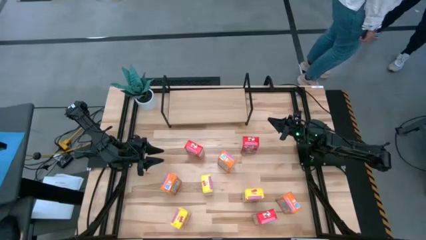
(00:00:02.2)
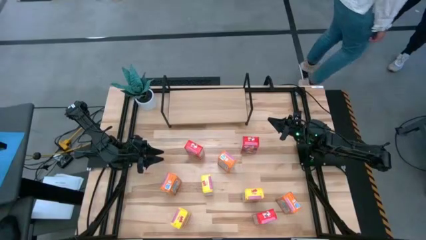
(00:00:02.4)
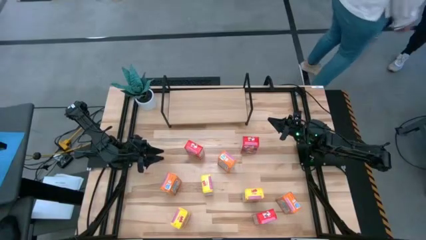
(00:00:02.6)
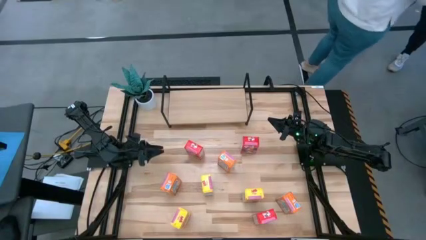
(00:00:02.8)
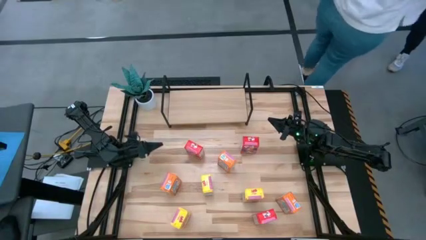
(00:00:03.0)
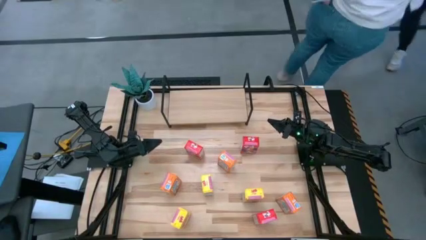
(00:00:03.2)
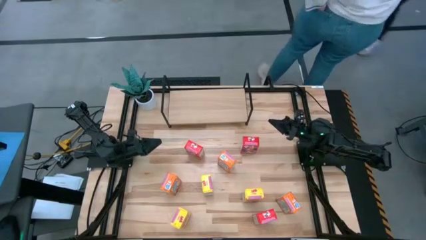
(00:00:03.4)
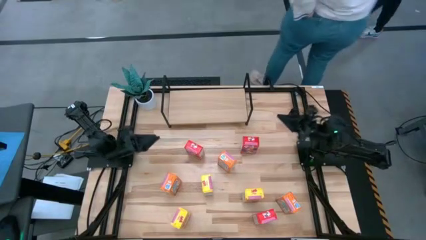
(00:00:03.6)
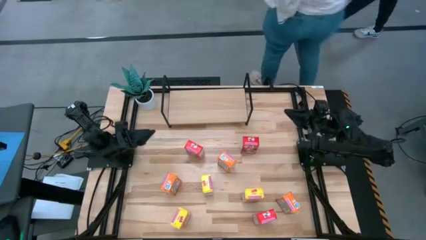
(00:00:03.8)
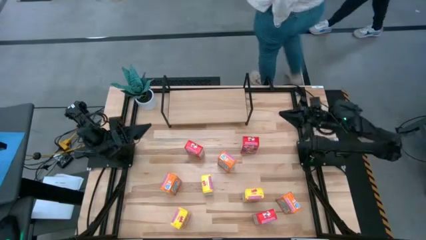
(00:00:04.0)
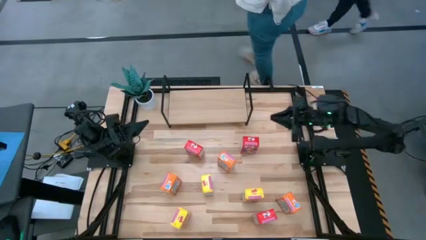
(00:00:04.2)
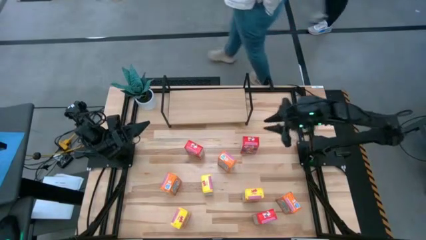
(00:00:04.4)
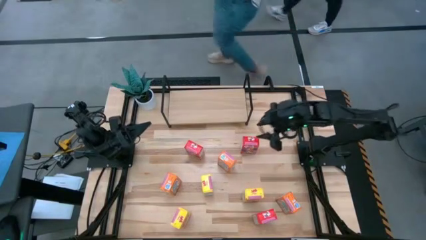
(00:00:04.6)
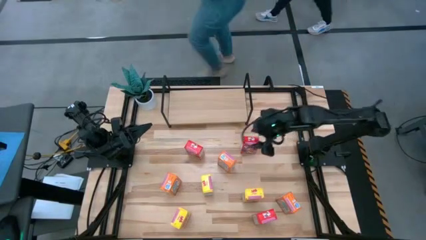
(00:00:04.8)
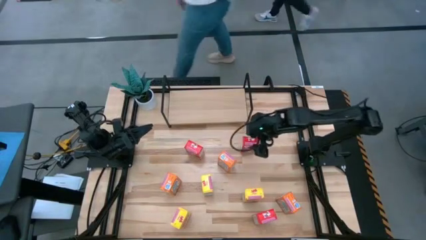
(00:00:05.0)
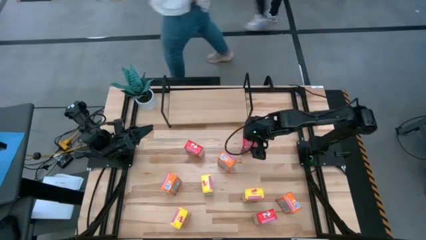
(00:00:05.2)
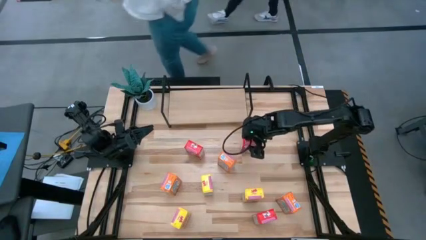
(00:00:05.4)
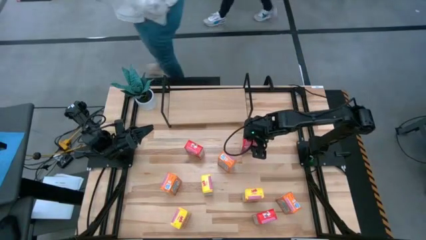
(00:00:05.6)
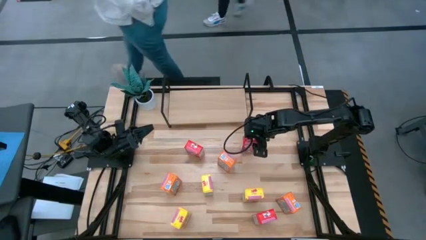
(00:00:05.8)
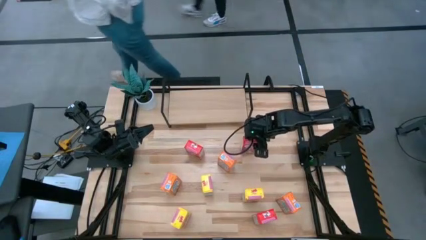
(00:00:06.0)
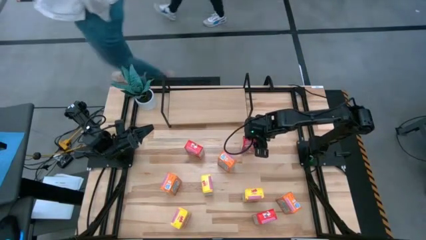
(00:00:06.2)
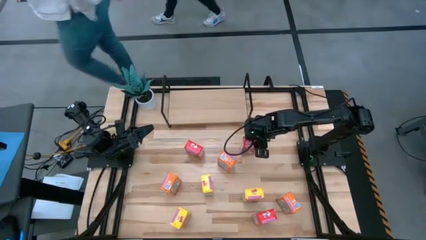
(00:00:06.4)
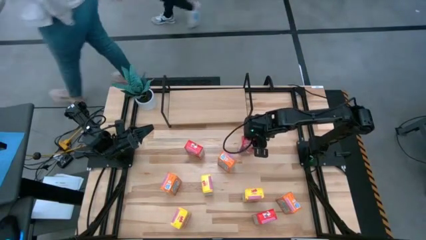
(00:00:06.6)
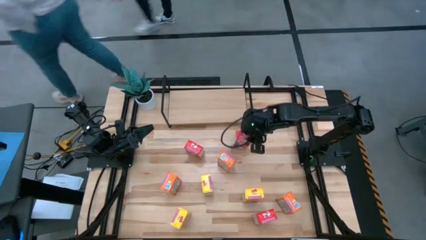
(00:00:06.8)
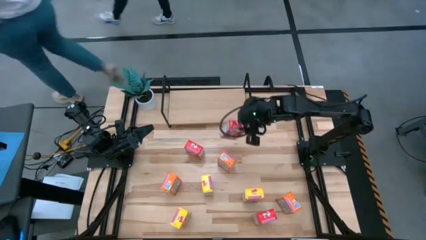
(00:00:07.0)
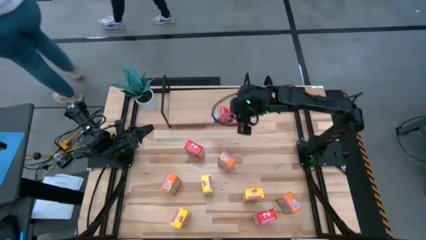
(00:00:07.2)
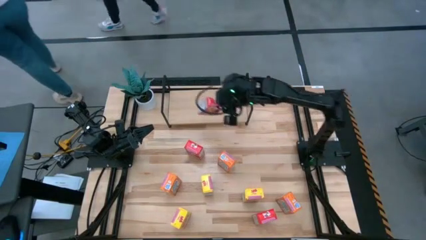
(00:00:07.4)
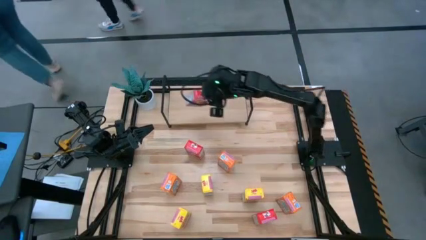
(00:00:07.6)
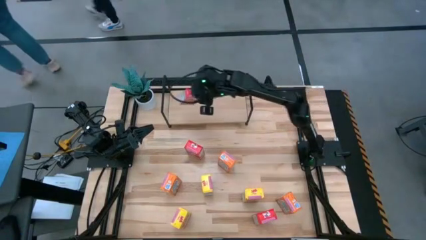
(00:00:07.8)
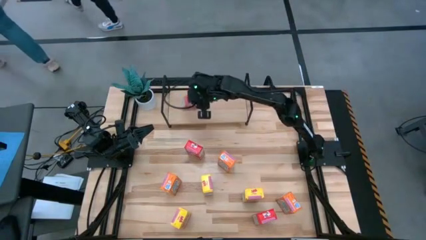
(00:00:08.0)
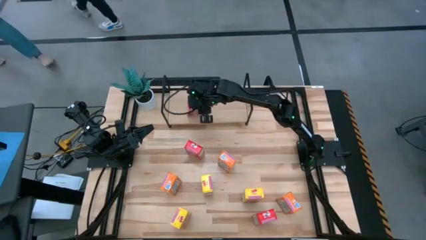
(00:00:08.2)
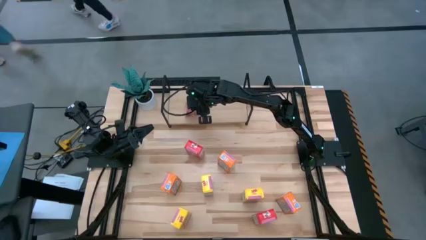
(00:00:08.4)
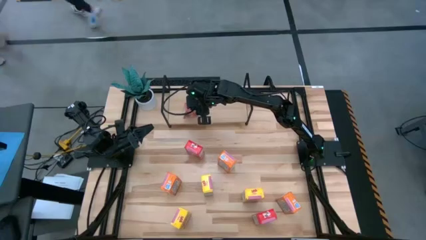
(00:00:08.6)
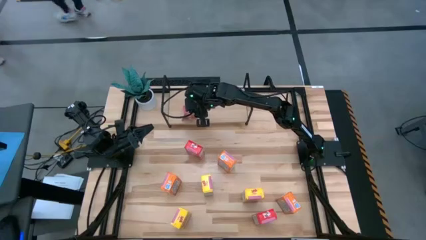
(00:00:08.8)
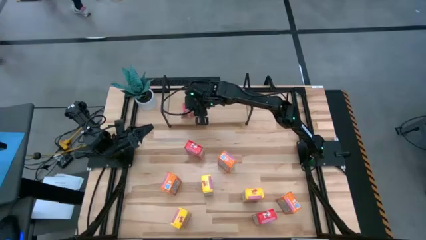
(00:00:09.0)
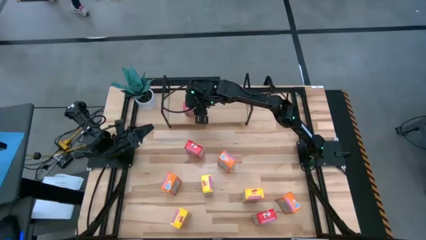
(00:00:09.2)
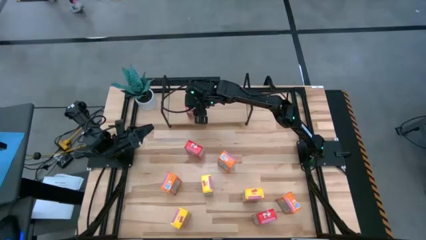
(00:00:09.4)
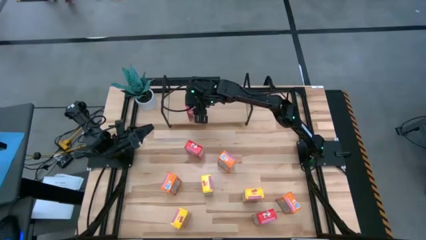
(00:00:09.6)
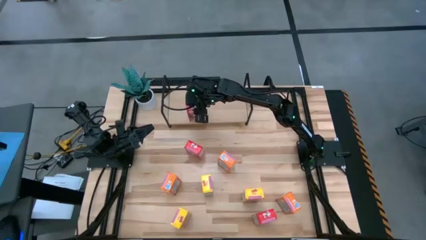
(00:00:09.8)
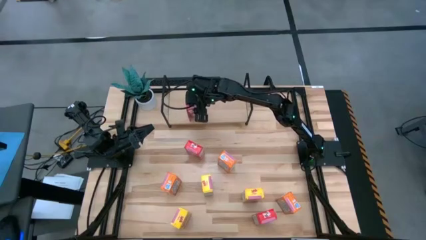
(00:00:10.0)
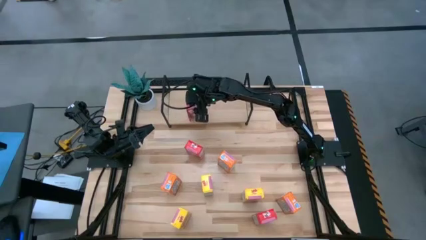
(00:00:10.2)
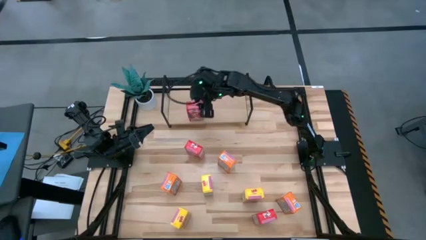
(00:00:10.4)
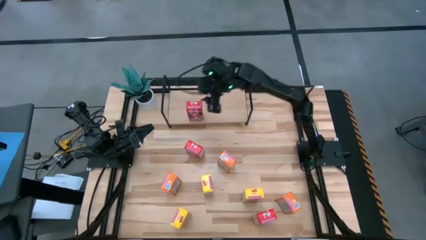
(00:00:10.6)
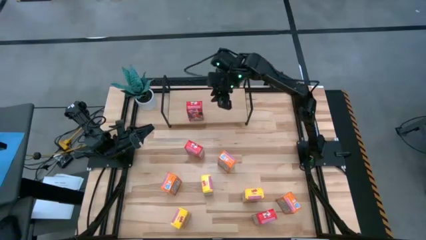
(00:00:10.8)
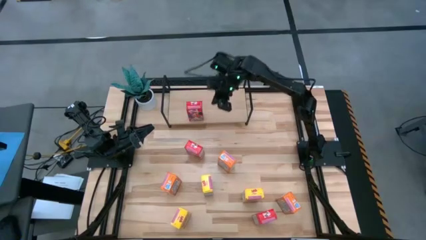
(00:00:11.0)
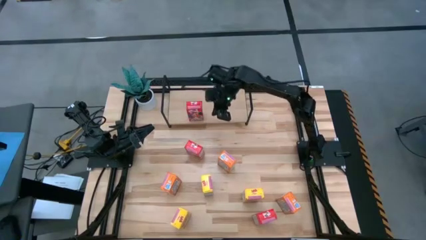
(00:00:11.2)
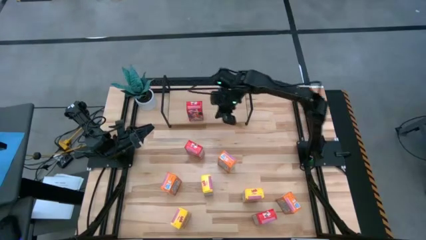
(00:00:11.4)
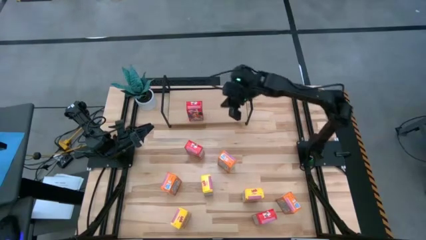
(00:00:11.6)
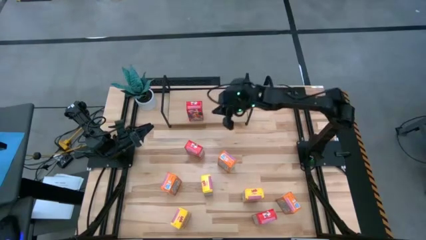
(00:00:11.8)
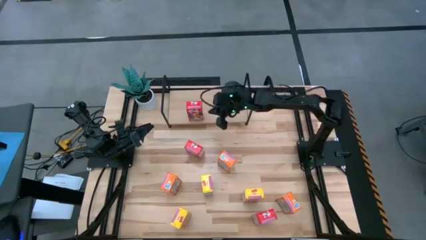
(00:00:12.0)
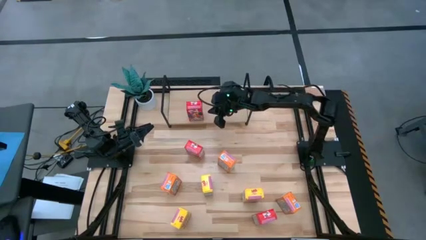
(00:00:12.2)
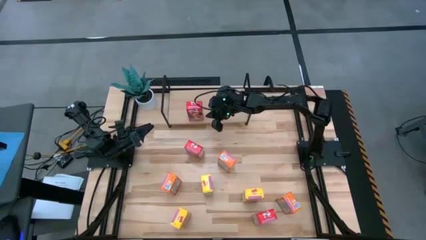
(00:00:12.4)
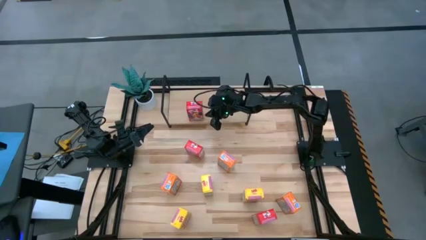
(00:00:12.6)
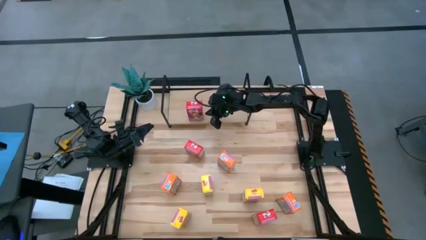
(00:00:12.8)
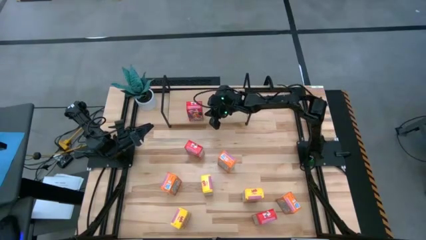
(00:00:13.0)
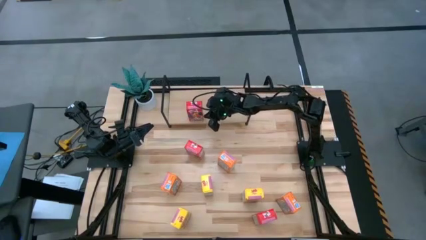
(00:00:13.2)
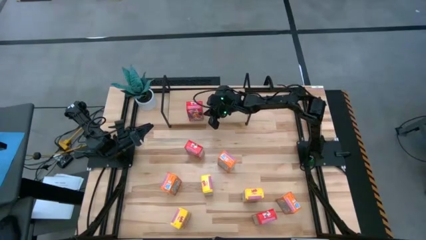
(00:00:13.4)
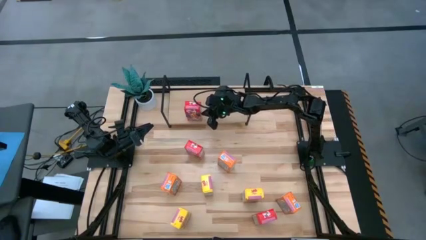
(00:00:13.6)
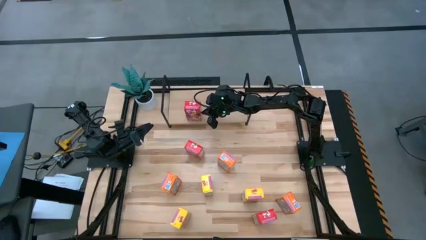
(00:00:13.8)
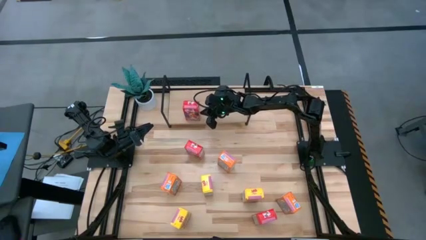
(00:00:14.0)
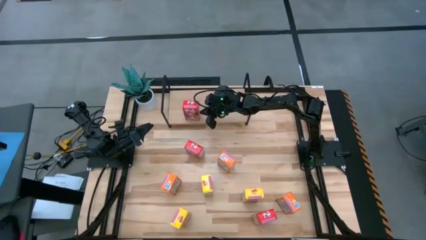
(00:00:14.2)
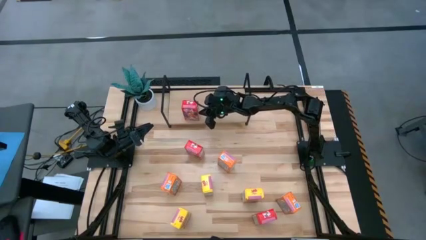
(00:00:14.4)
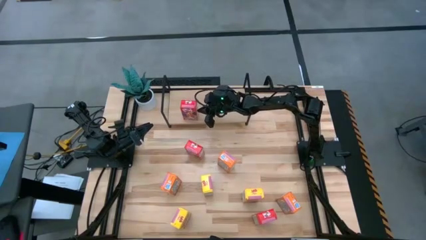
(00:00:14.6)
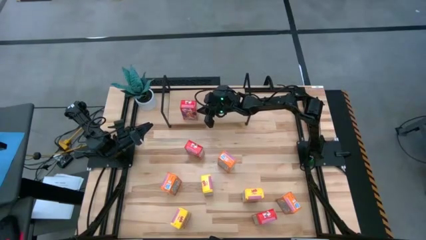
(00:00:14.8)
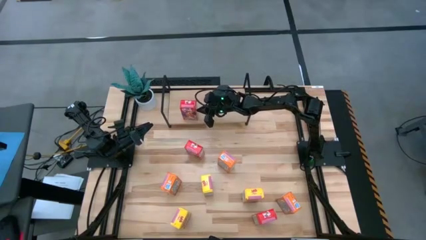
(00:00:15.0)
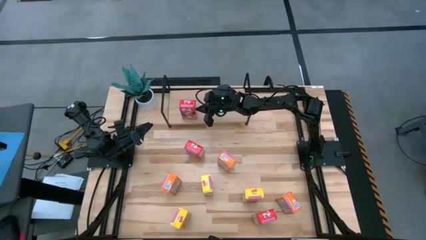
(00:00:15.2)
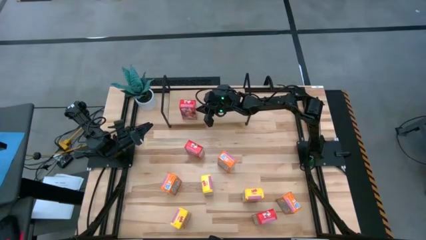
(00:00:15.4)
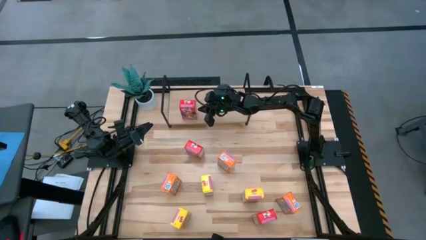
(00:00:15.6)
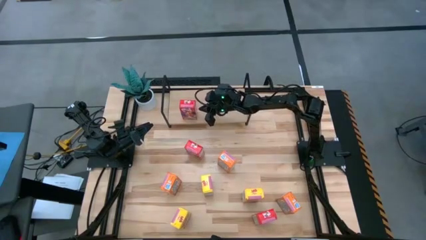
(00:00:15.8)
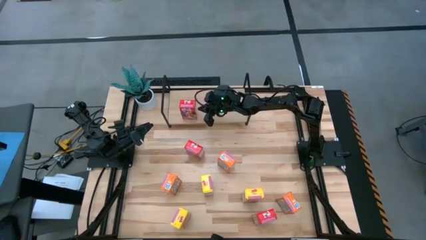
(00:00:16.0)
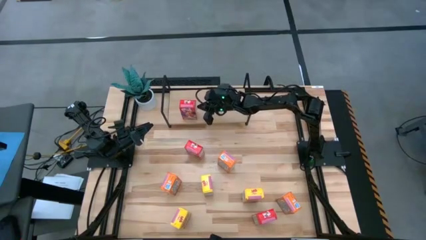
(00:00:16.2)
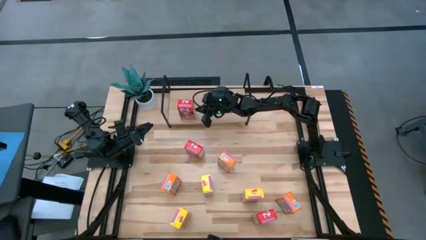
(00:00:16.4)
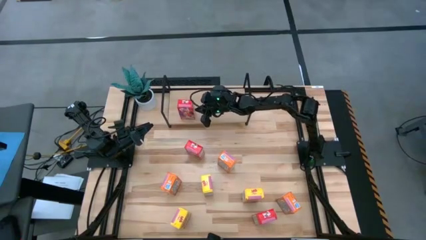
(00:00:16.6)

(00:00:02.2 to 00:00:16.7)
Task: Stack cereal on shelf
Put the top right red cereal box on the shelf
